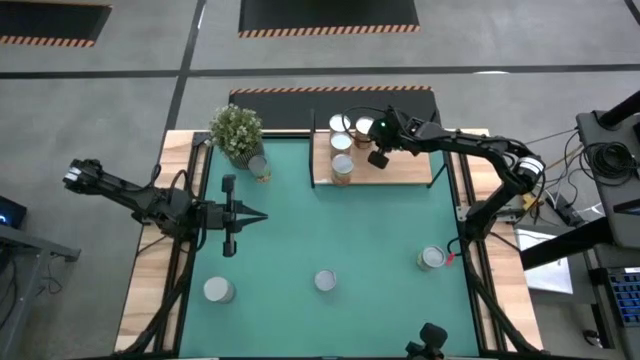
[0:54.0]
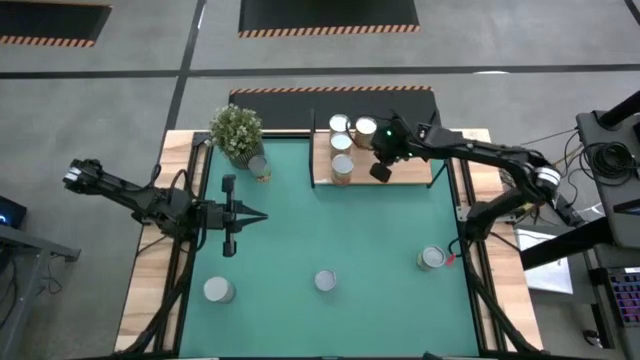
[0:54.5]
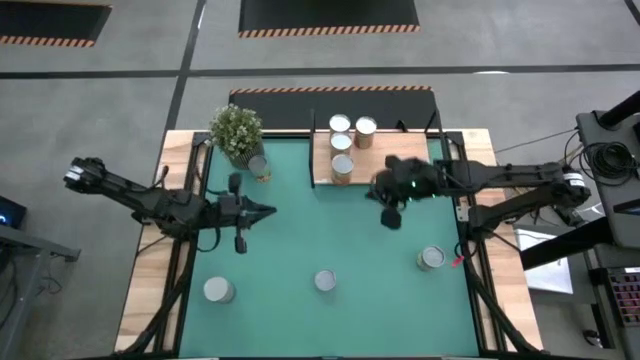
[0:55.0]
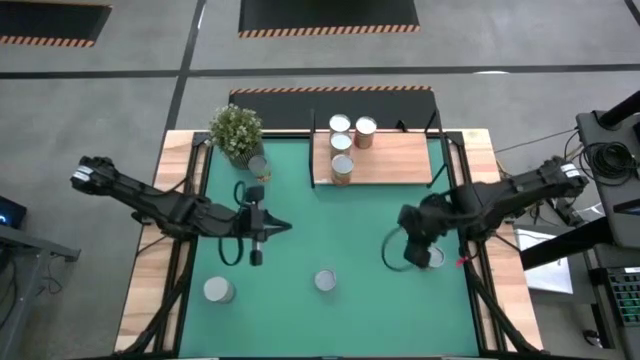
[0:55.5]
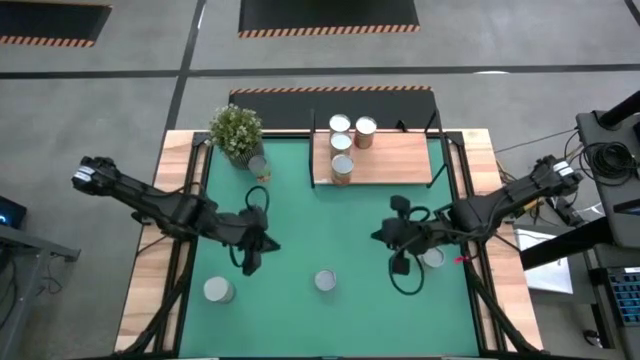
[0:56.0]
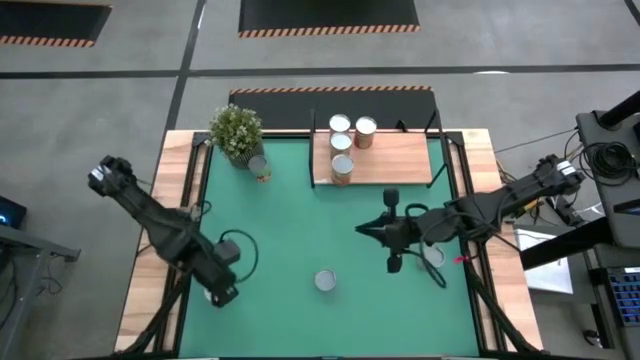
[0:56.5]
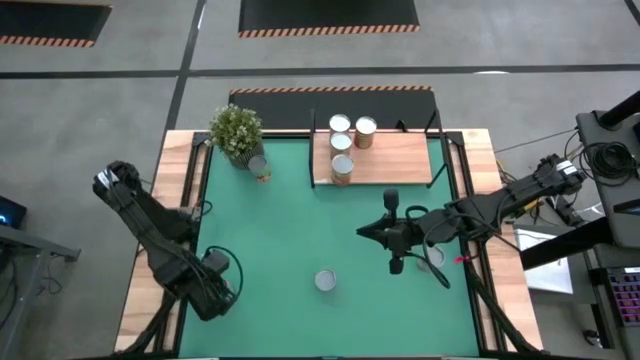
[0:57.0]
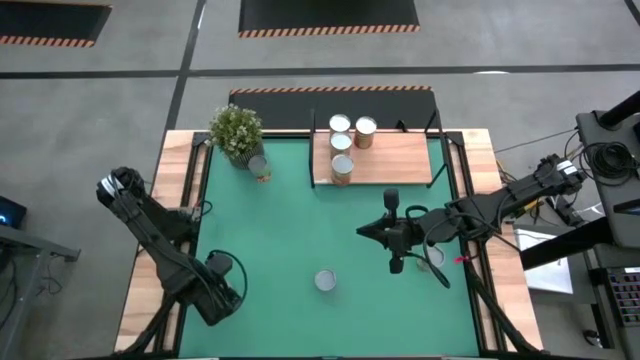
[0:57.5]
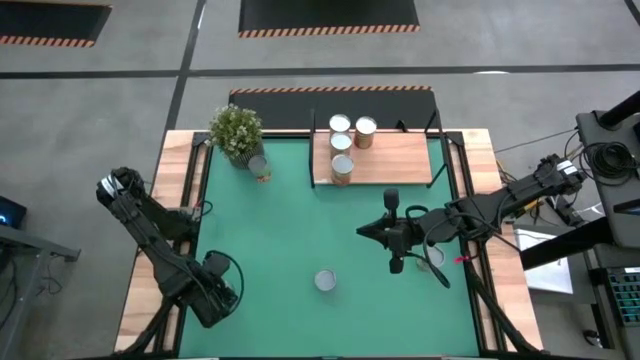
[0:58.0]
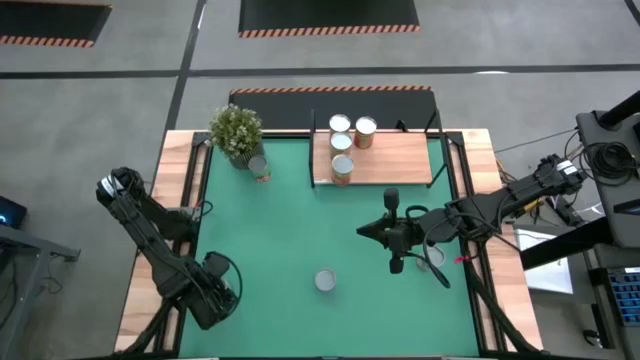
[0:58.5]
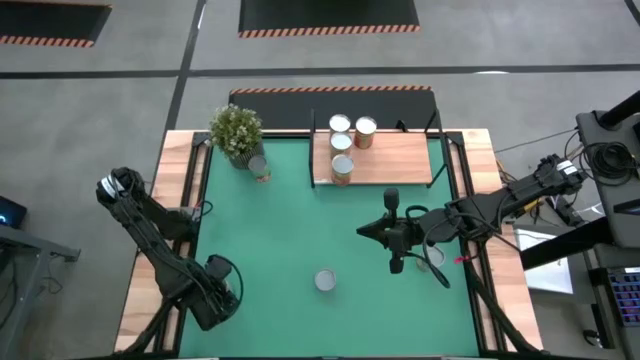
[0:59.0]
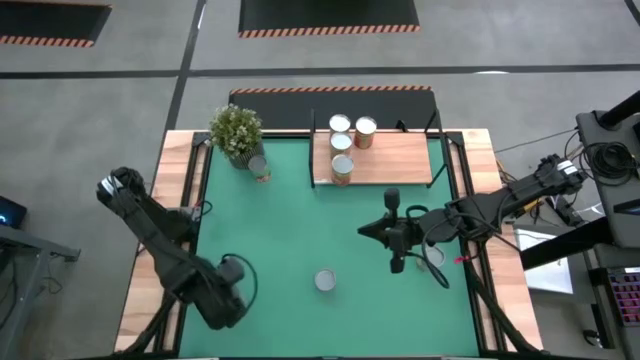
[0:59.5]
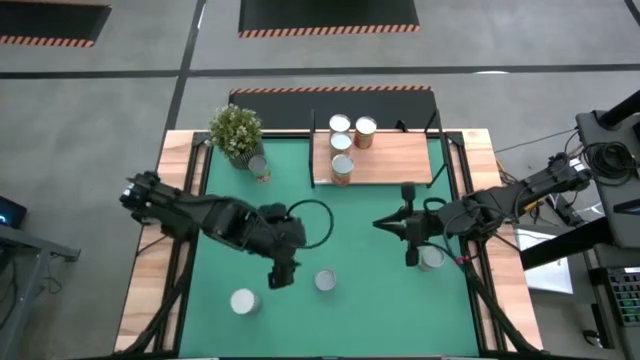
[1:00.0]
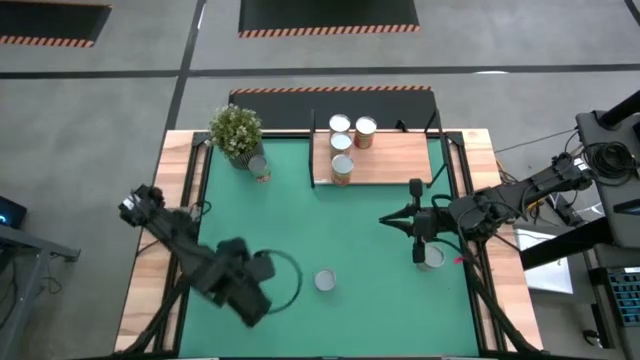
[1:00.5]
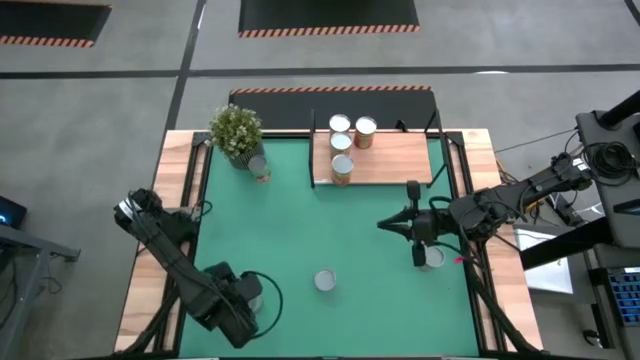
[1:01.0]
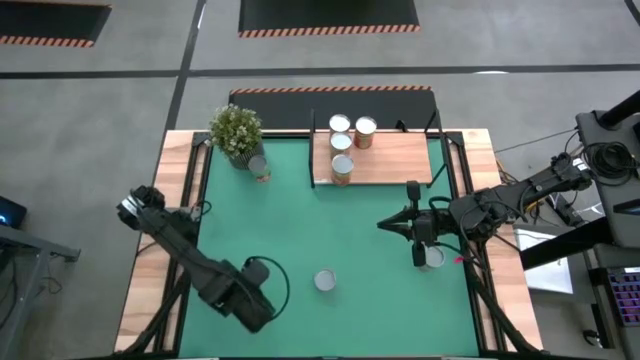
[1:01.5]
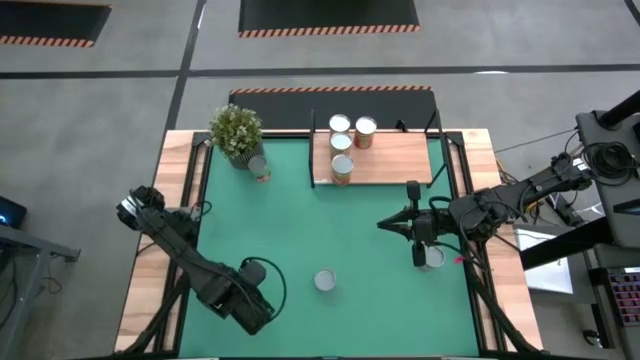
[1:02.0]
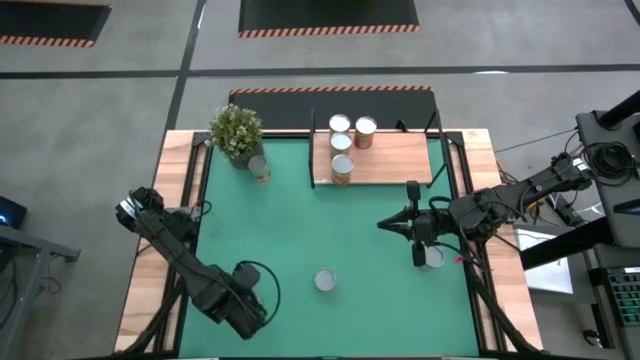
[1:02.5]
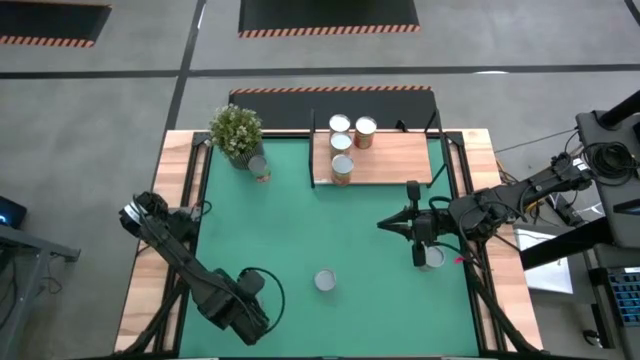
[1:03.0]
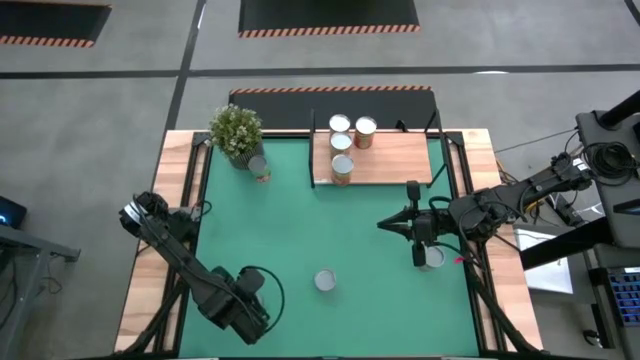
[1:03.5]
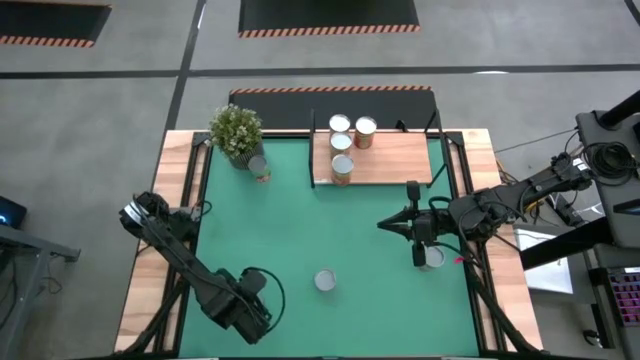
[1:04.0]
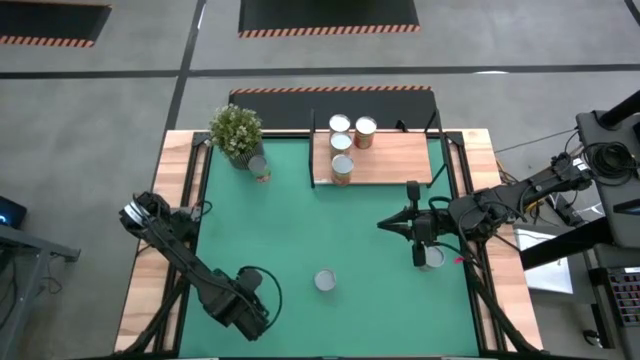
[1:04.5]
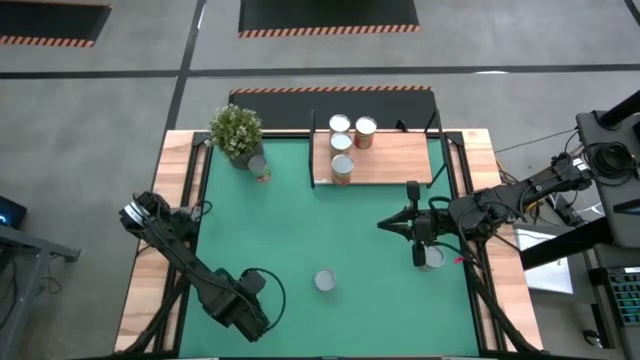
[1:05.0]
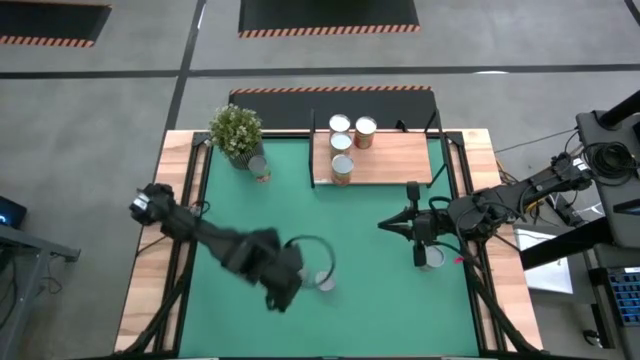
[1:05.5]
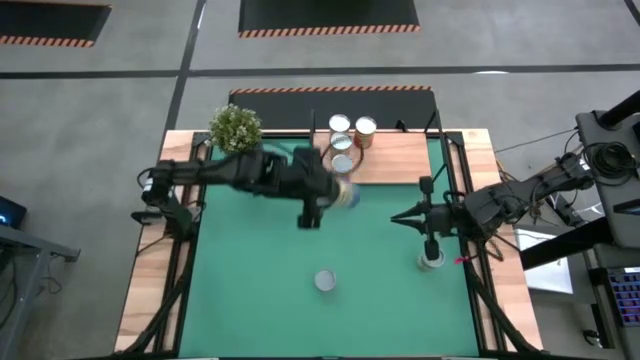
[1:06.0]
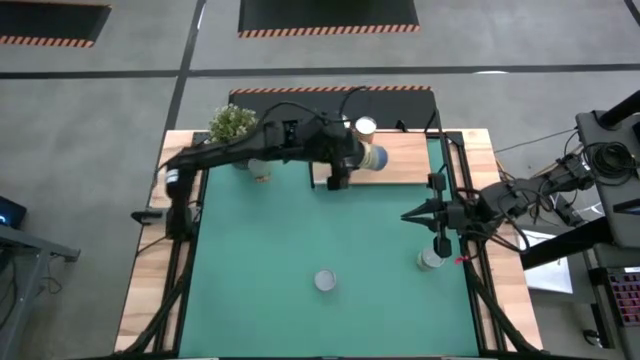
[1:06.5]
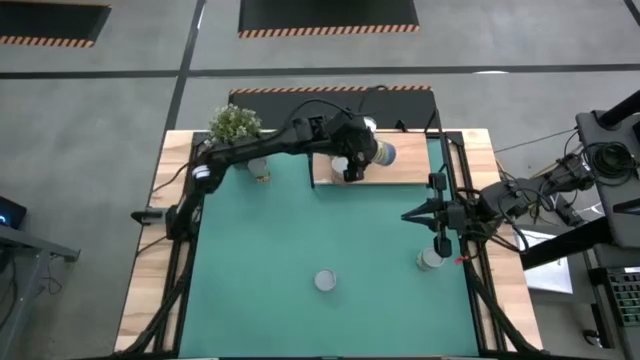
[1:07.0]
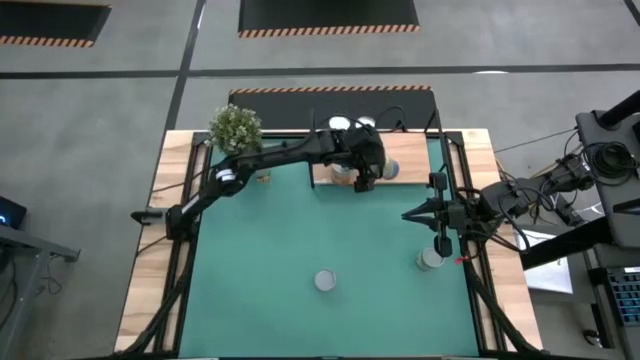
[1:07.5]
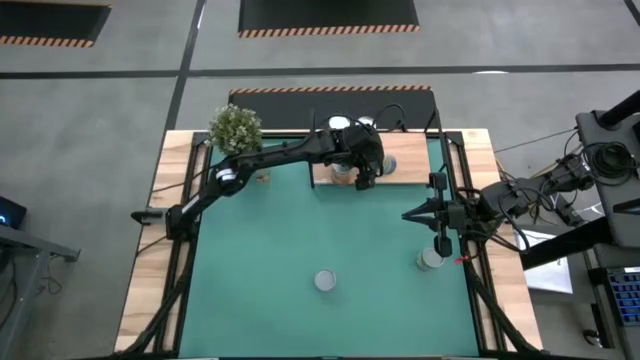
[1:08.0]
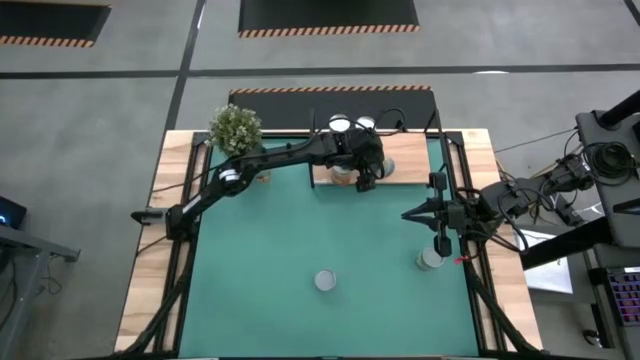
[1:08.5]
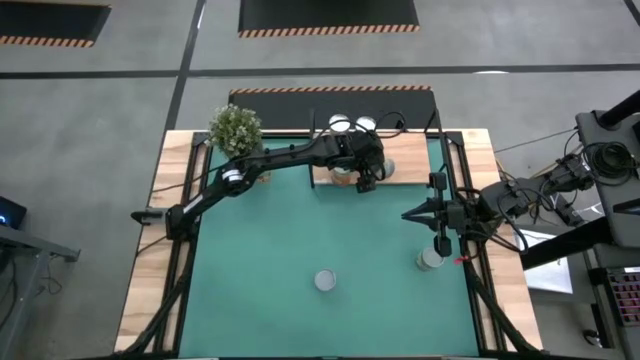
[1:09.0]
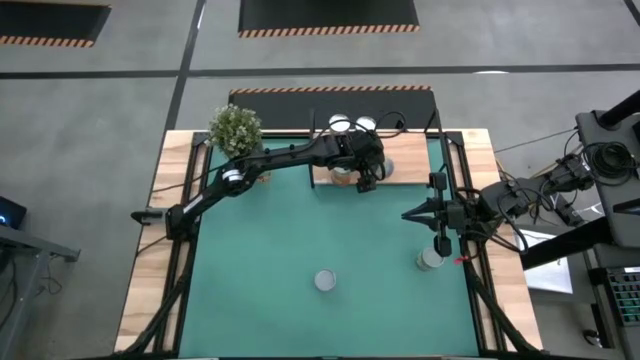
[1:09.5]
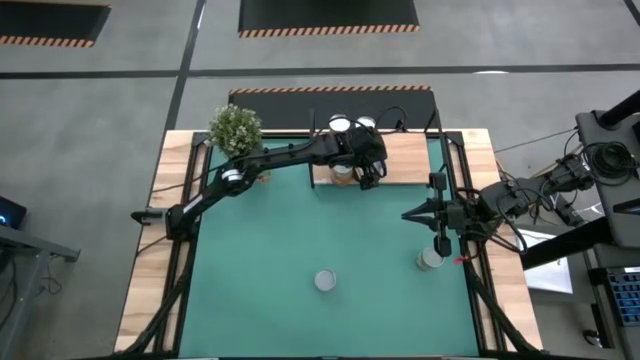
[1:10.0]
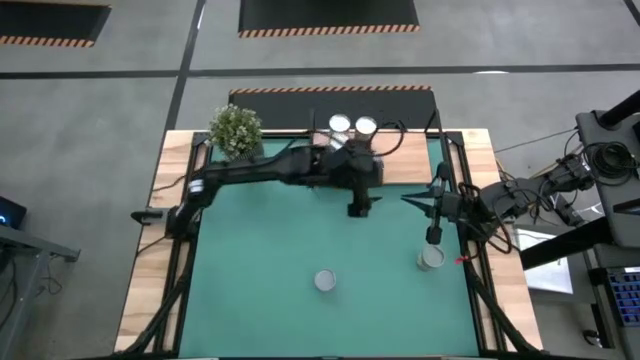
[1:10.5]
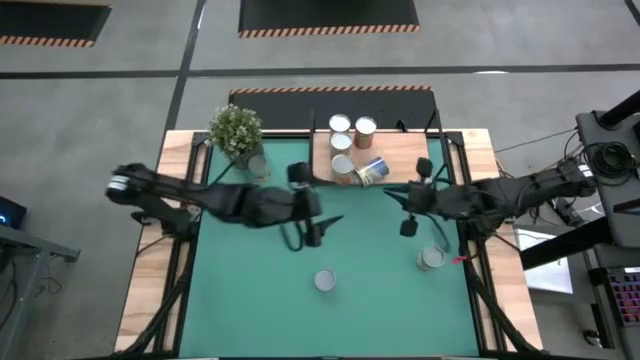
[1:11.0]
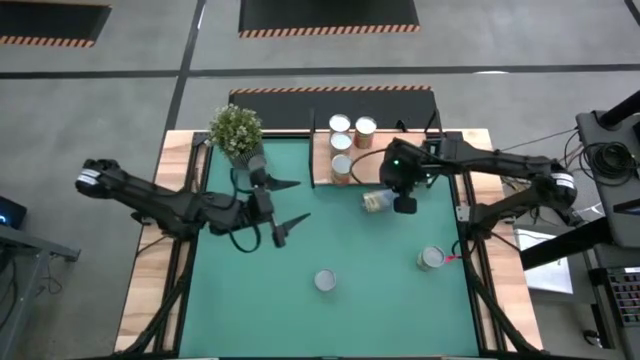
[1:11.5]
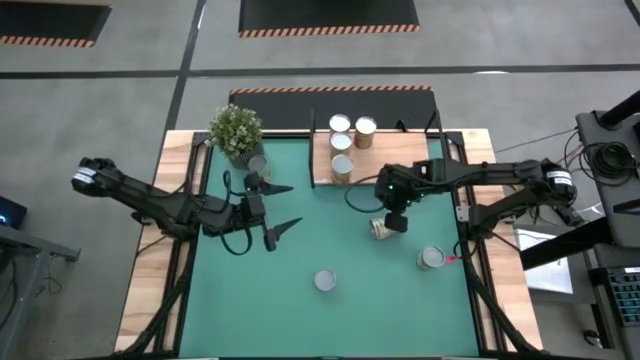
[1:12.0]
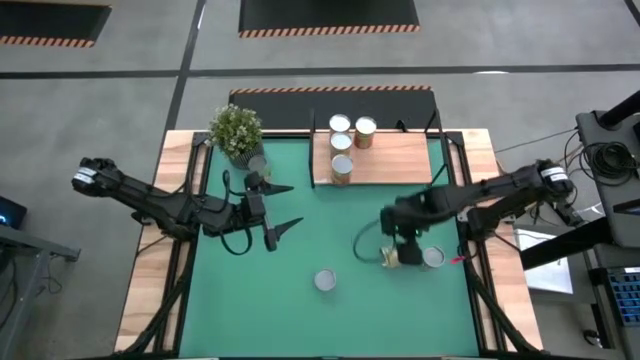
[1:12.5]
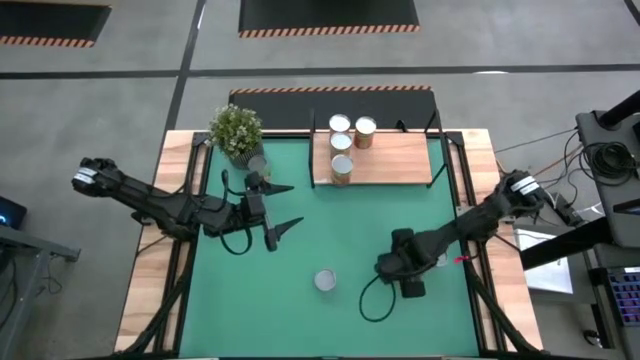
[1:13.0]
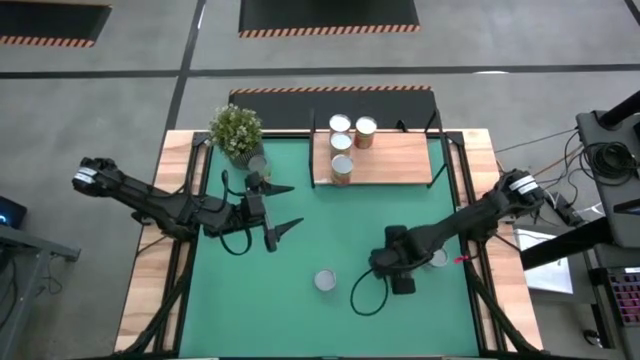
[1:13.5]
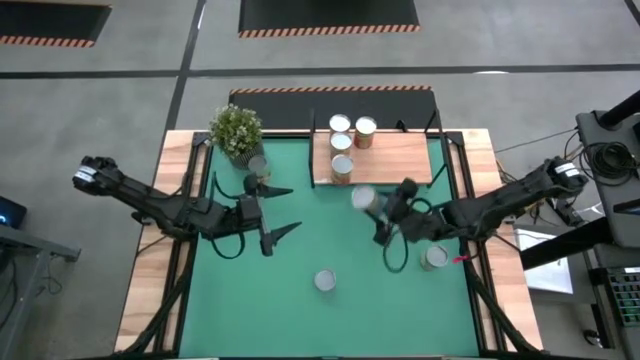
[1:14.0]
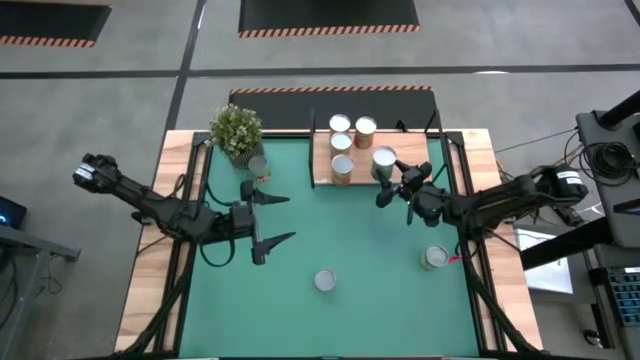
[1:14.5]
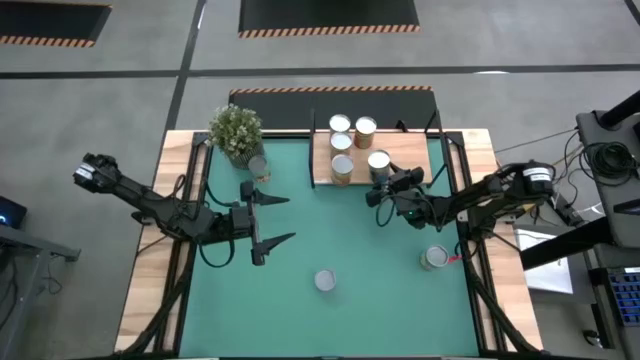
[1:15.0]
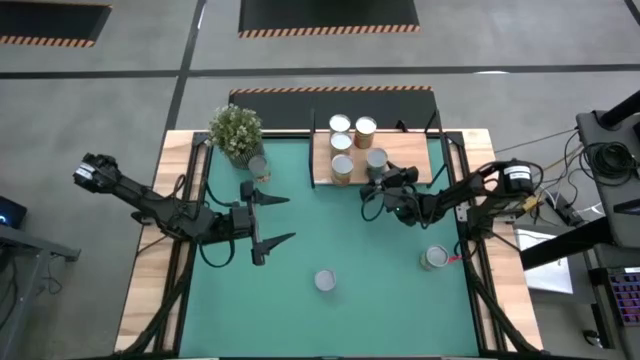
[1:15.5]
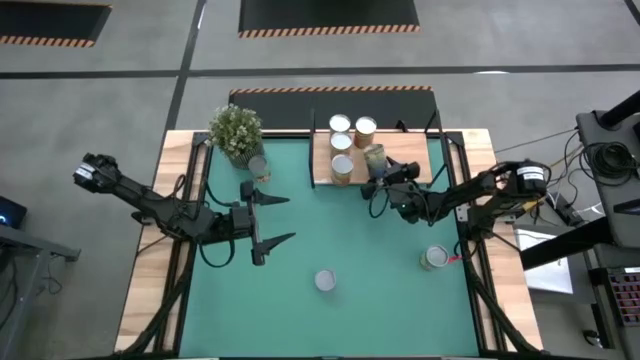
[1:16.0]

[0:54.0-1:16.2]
Task: Pick and place cans onto a shelf
Put the purple can on the shelf
